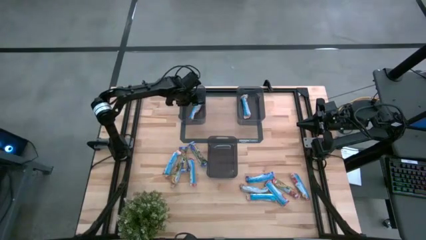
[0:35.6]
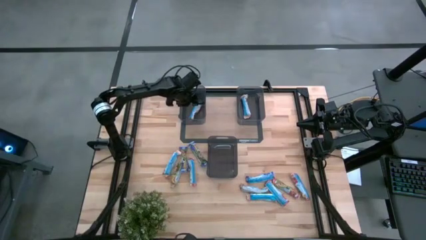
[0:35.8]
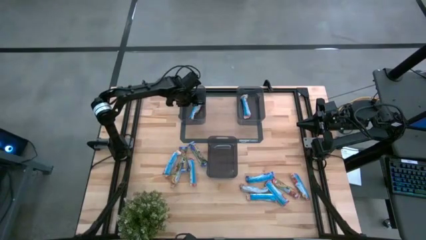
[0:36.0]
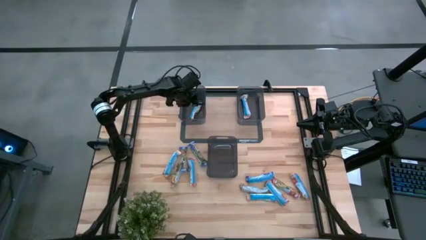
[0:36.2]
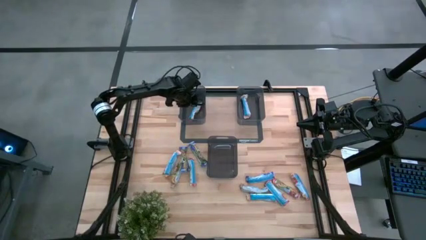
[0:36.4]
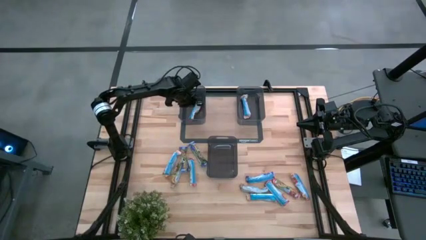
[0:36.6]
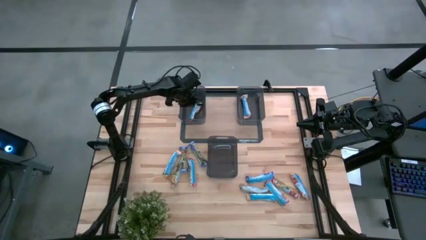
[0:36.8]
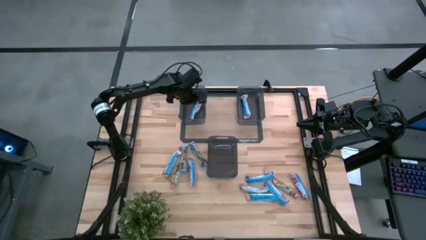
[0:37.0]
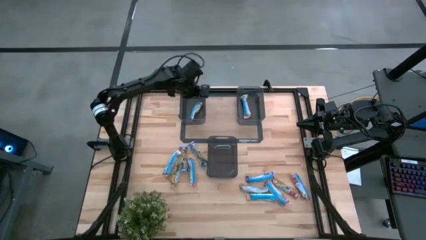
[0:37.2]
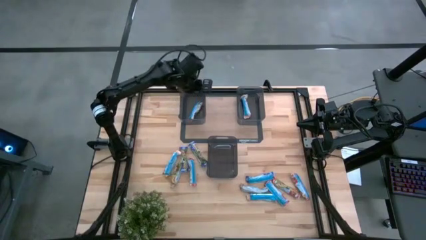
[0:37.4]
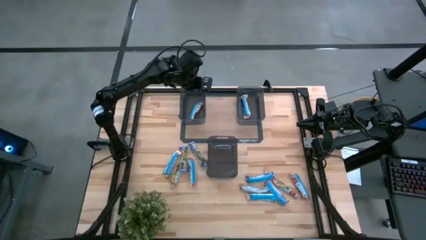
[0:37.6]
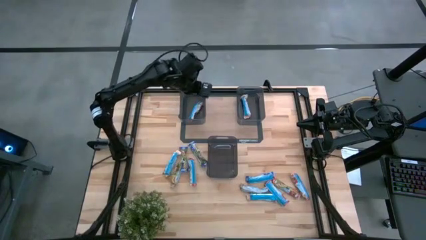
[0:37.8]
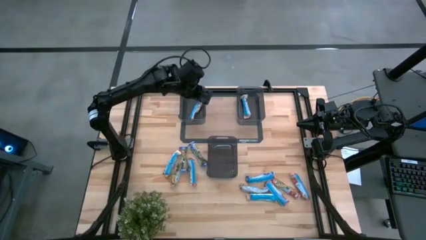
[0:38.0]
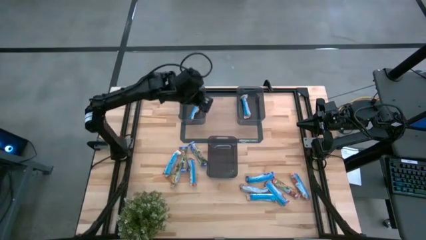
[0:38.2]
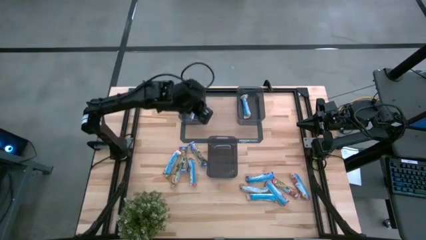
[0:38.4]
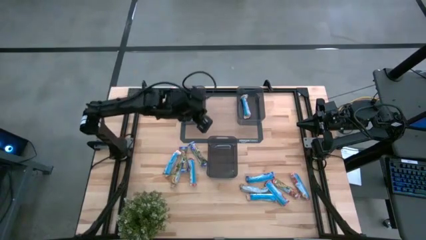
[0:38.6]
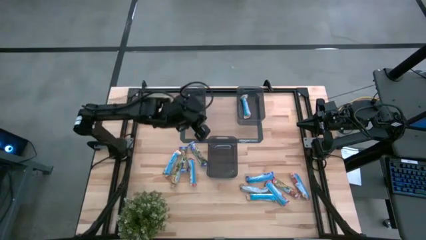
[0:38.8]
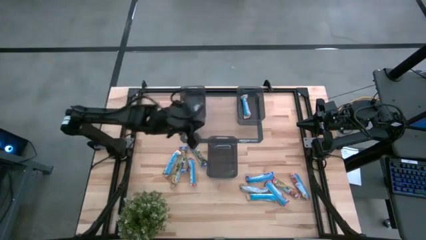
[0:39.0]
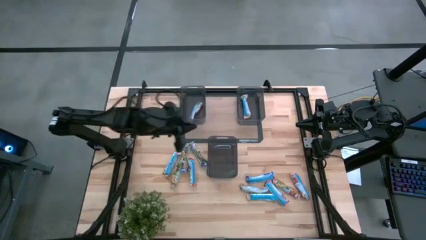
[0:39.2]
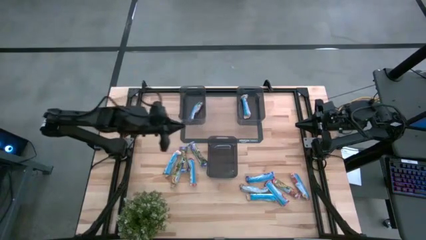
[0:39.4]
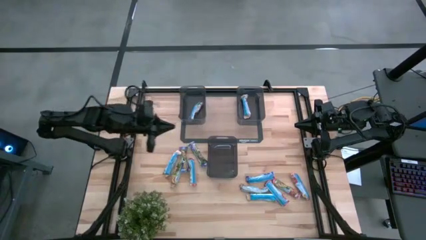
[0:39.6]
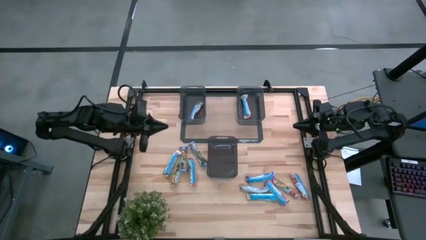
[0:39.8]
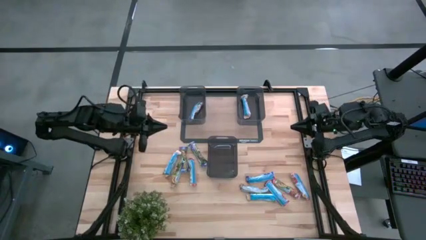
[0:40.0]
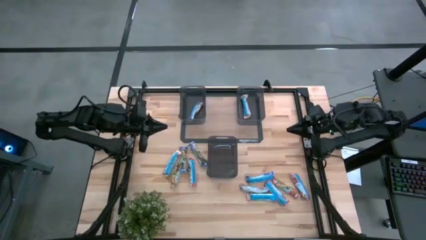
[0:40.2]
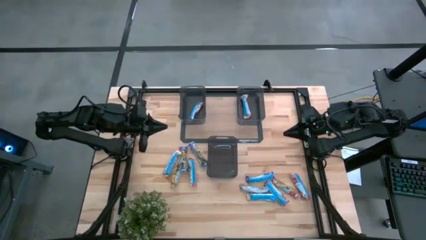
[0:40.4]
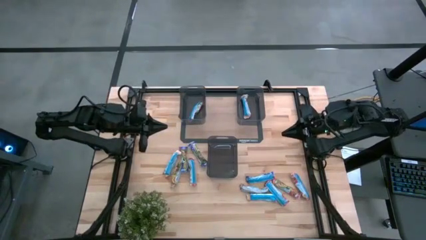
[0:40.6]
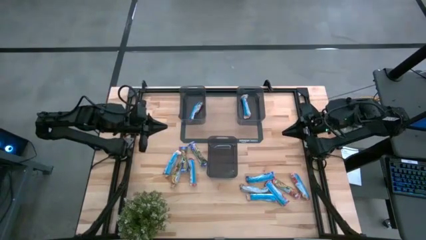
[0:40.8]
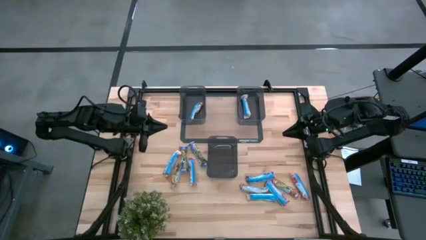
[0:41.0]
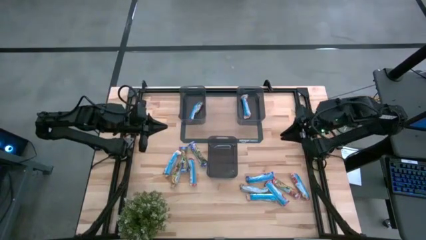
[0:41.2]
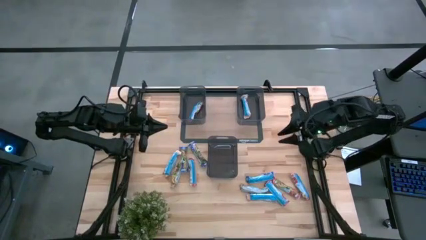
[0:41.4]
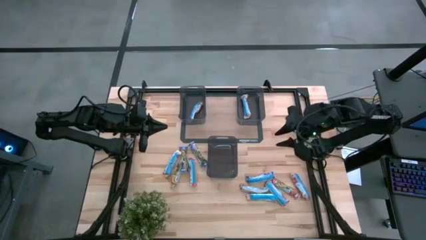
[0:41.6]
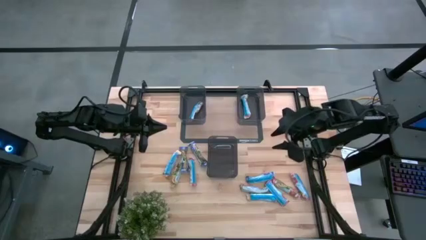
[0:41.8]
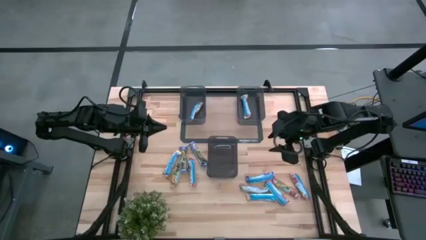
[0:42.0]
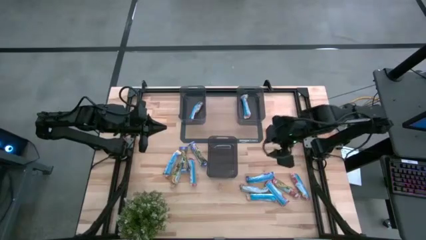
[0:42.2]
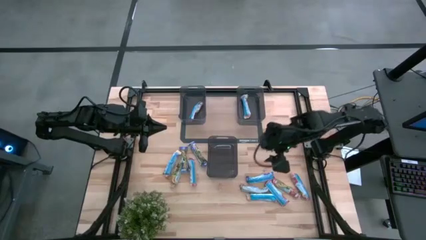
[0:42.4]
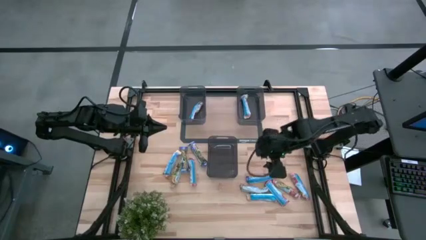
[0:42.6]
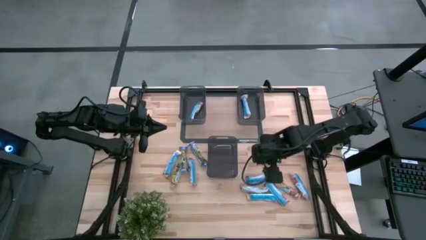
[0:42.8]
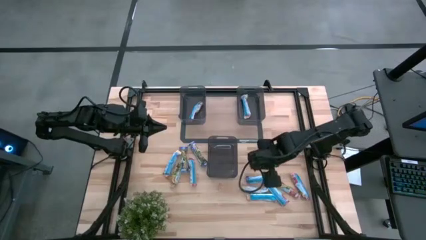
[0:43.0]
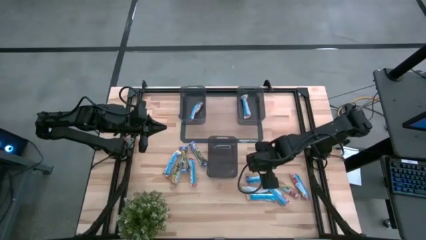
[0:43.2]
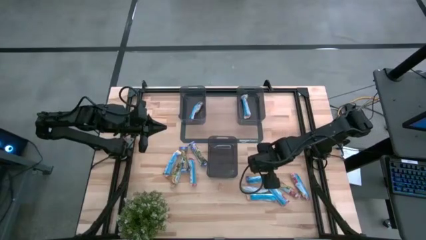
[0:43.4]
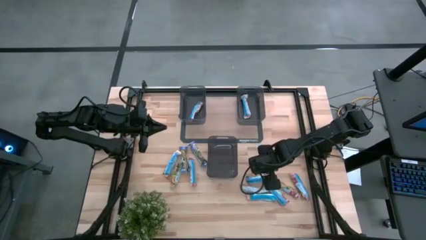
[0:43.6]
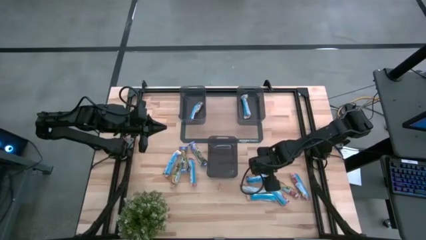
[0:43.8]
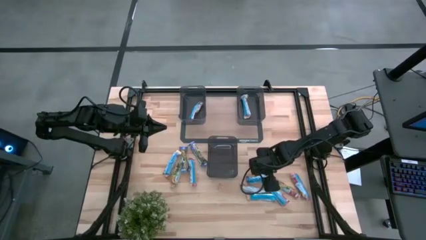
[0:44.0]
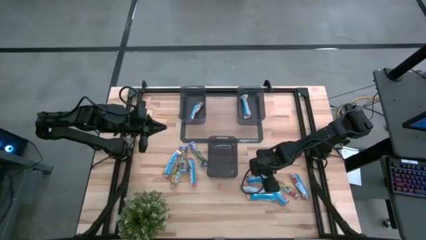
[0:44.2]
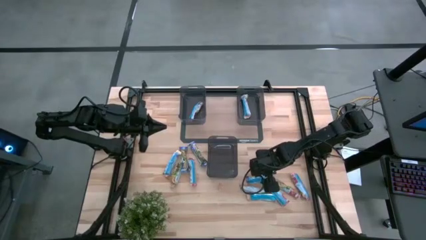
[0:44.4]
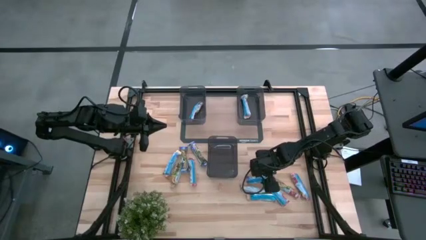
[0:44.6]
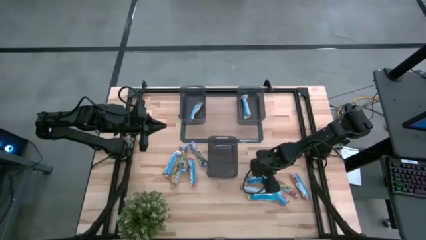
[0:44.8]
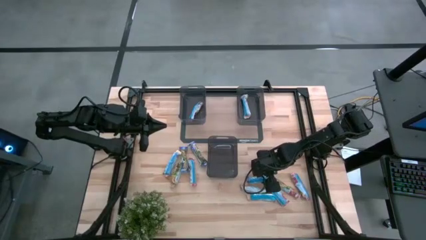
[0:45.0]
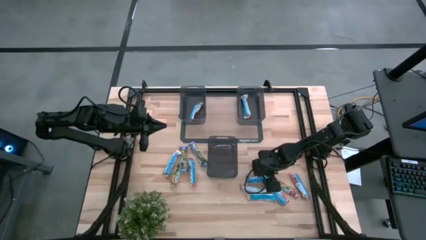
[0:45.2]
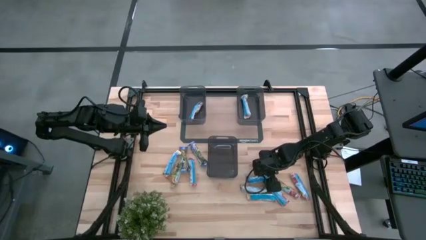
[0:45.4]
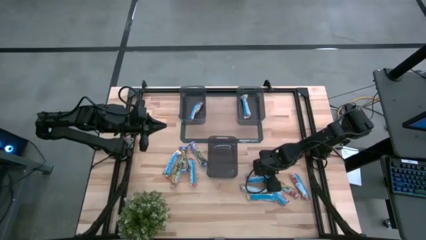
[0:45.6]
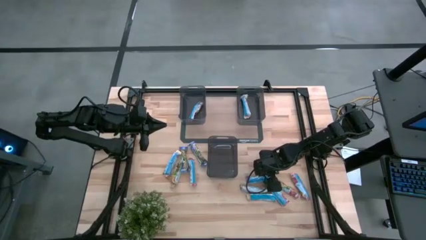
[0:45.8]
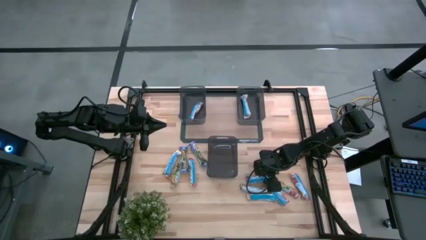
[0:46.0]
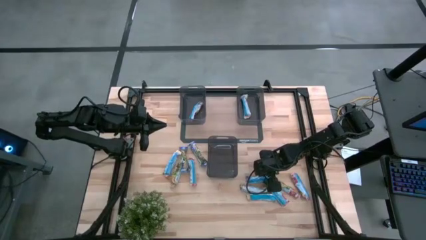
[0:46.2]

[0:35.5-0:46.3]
Task: Pick and place Granola Bars by type
Put the blue granola bar into the bottom black bin
